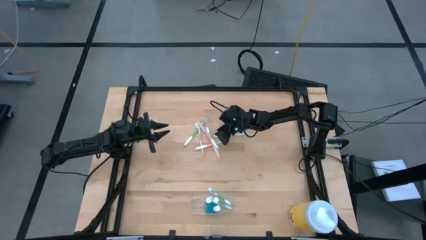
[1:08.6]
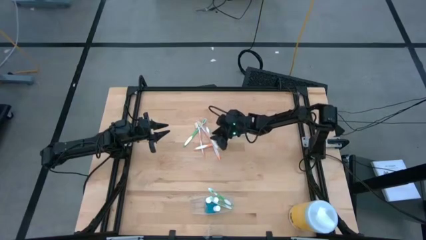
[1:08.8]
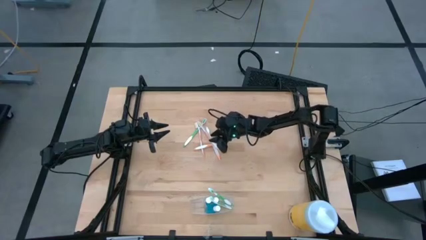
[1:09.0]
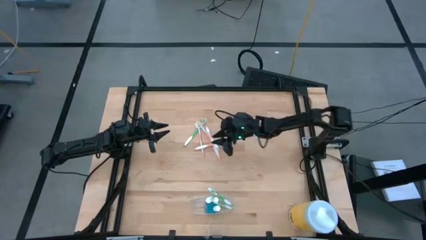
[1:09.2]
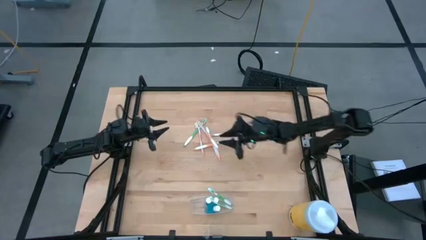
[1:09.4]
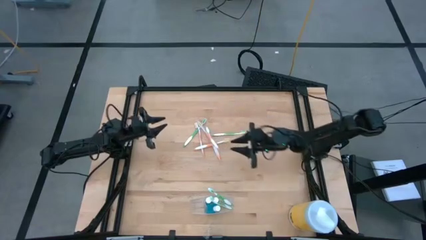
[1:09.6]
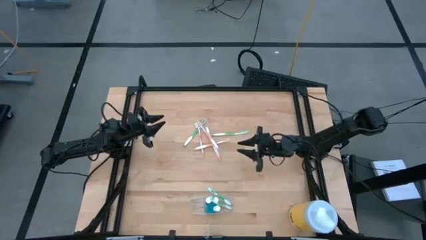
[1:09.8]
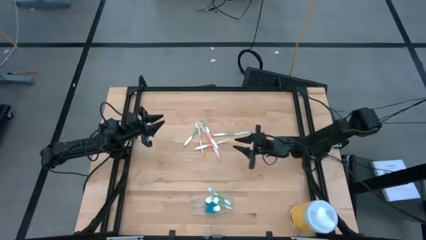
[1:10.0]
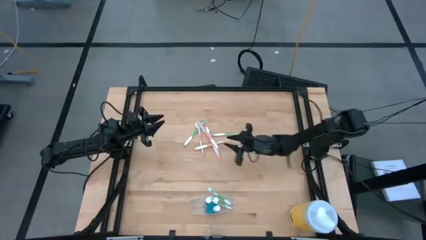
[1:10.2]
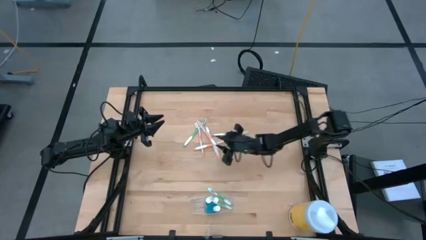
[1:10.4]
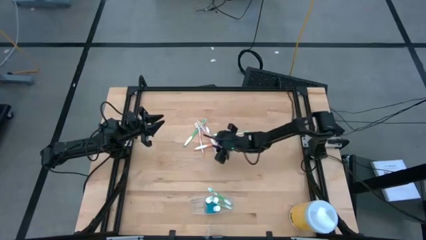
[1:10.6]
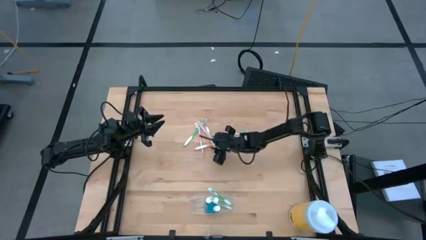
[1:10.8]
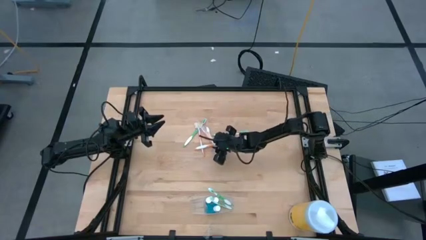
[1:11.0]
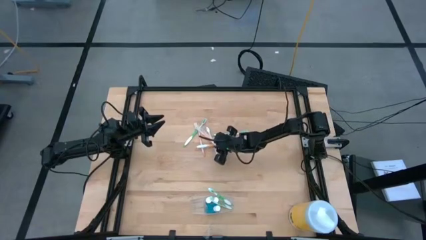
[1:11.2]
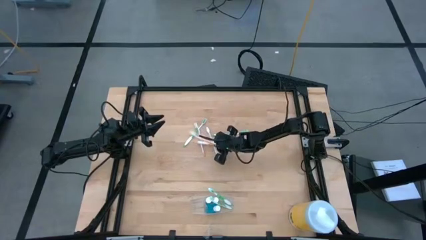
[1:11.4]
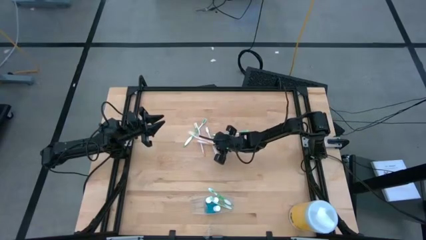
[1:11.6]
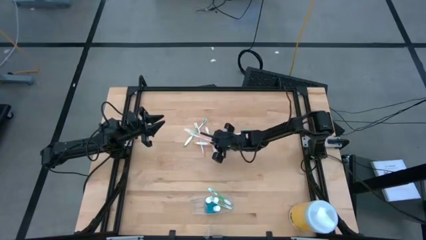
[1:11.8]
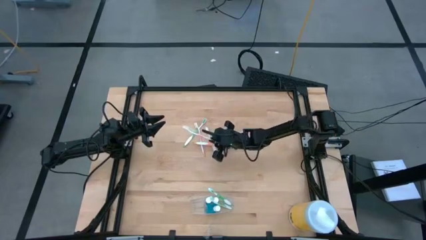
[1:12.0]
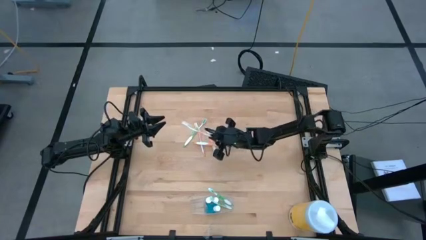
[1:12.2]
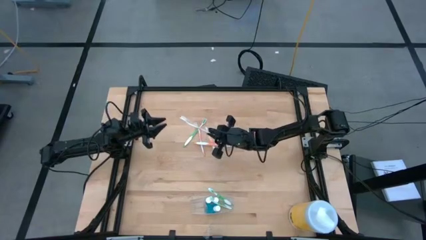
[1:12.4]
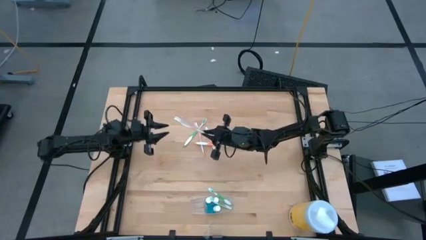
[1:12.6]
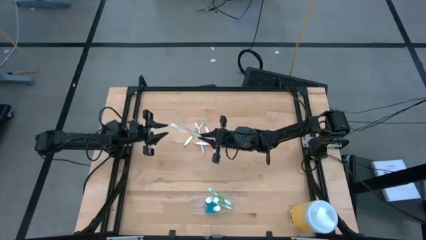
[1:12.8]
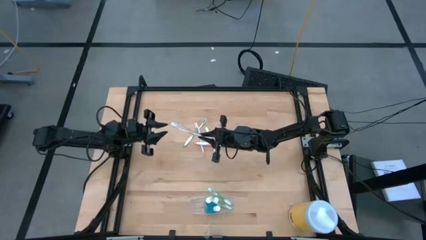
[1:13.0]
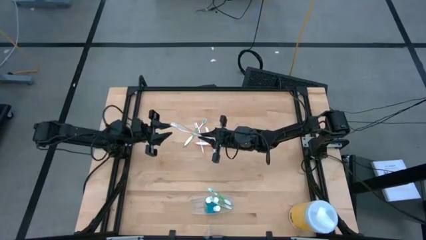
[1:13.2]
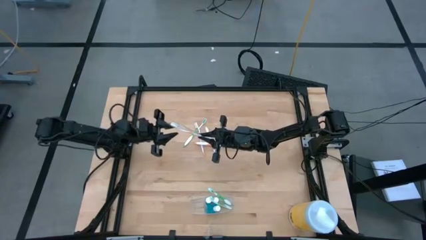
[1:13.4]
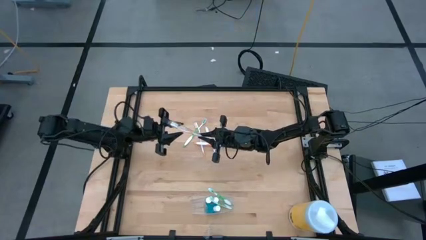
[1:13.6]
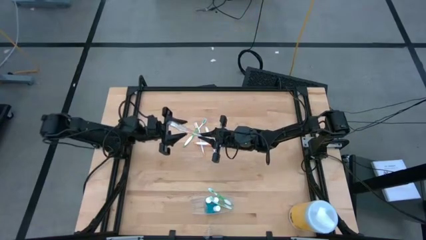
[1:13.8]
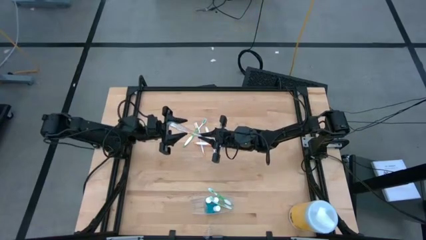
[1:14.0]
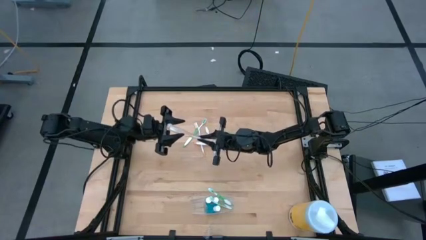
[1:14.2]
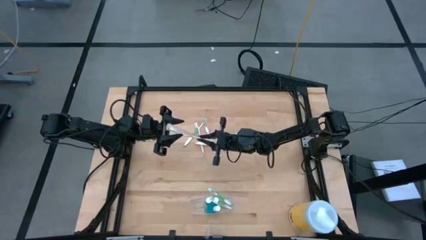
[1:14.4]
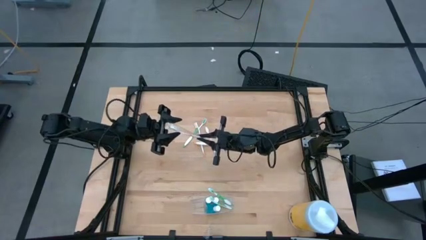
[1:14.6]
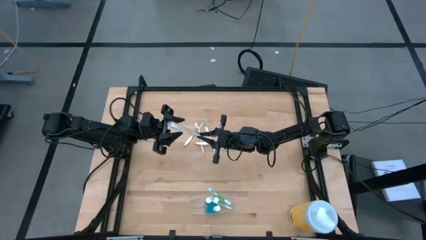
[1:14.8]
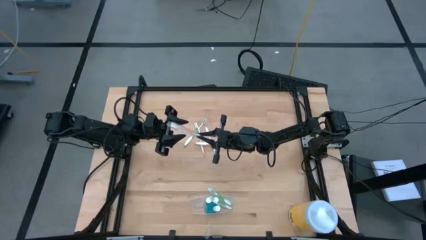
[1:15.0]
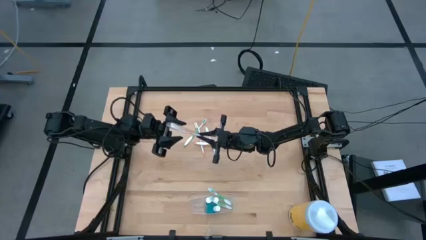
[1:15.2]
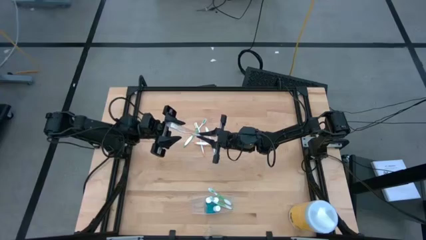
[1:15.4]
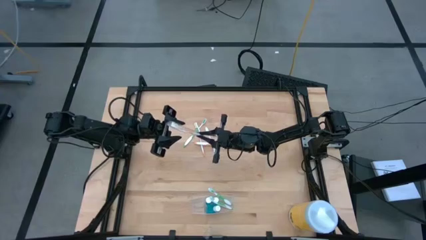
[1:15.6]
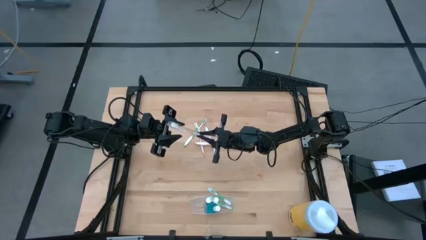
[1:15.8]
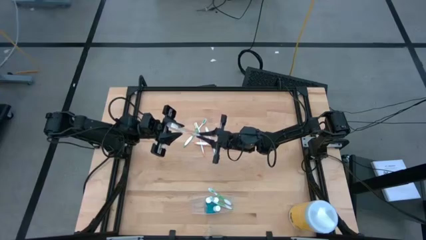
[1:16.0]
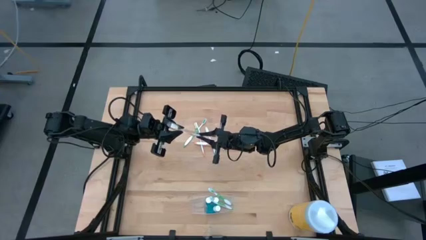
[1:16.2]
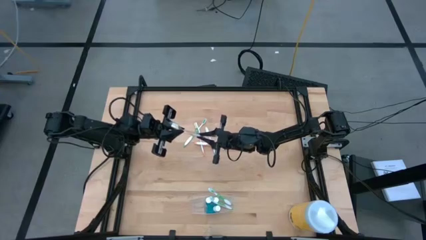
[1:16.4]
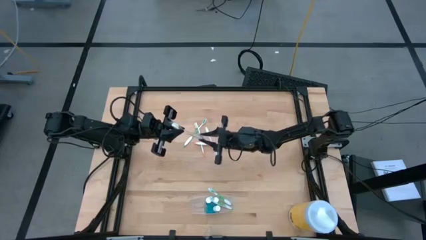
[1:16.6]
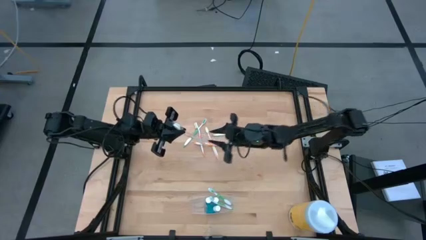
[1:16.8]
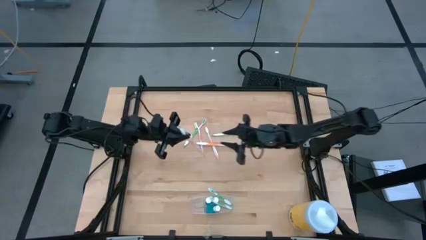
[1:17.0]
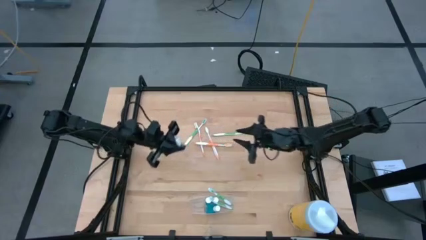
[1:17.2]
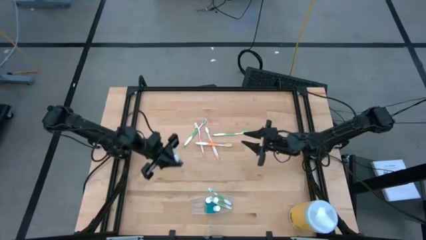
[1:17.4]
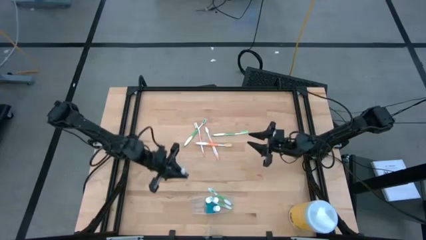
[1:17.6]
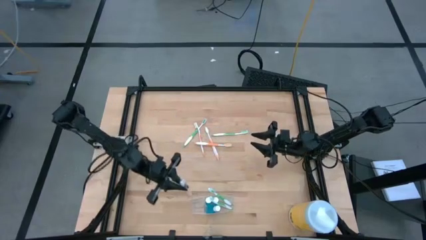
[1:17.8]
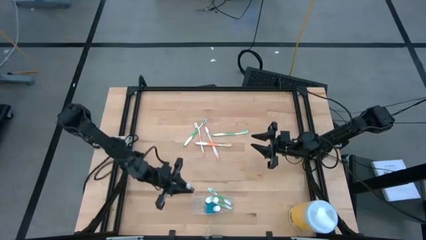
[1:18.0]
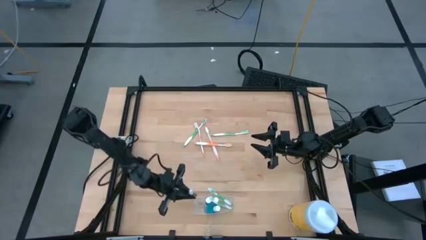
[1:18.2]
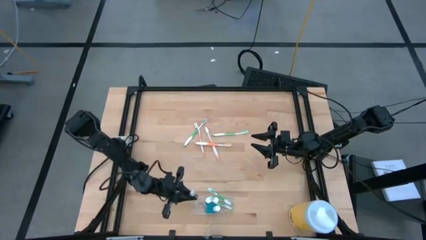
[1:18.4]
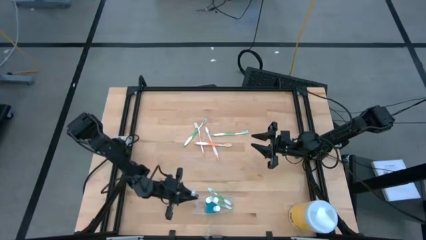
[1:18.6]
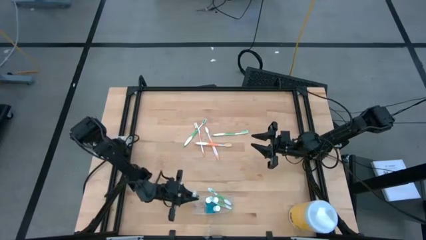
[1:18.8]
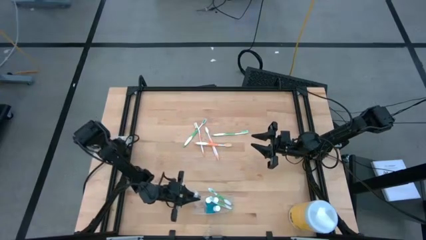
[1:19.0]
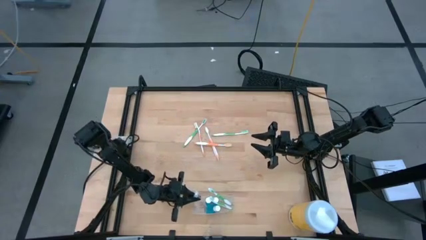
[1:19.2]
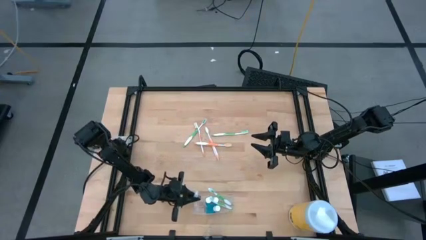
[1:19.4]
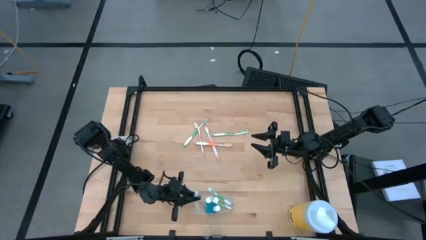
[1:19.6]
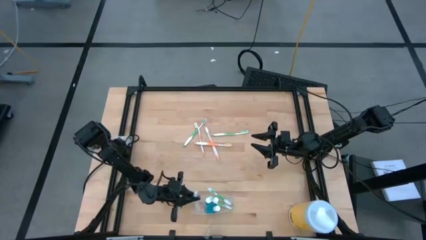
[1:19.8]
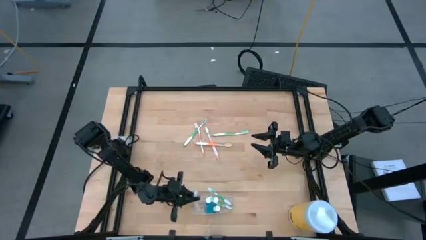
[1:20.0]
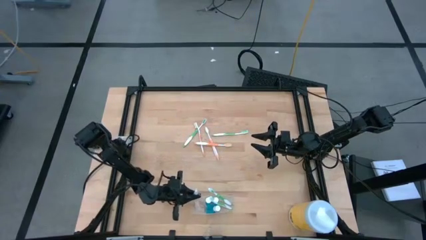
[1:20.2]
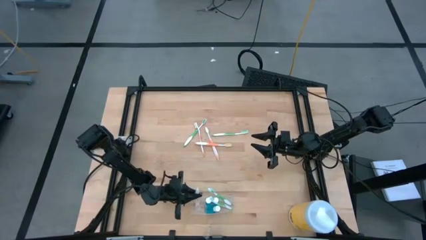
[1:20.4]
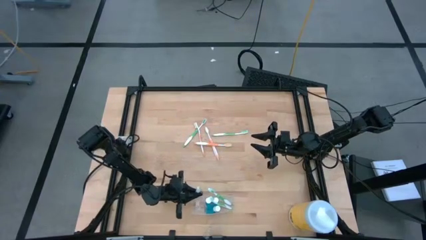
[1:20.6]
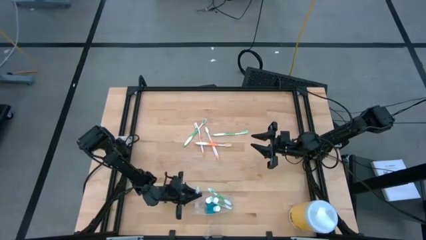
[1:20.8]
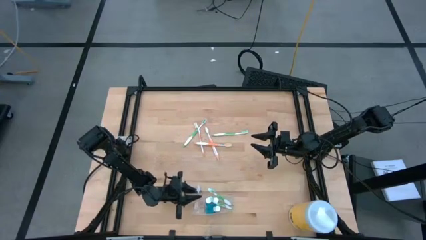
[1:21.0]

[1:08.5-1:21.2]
Task: Pick & Place toothbrushing station
Put the orange toothbrush into the transparent organizer
